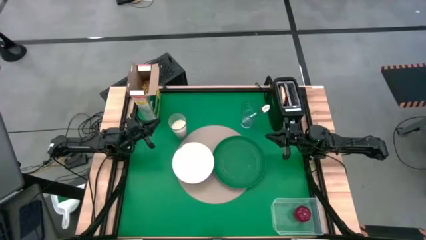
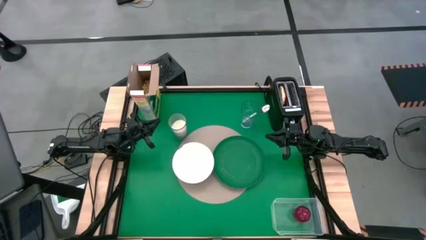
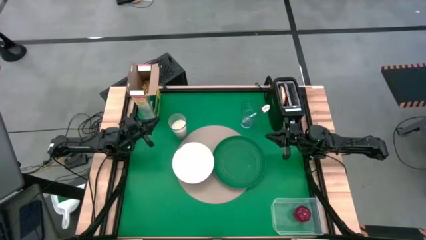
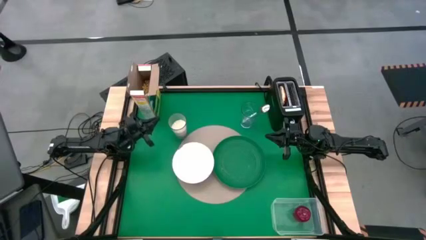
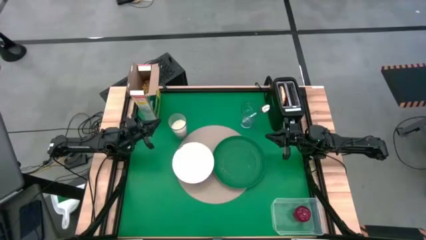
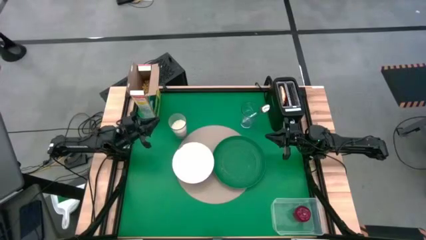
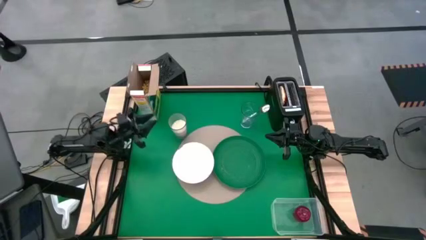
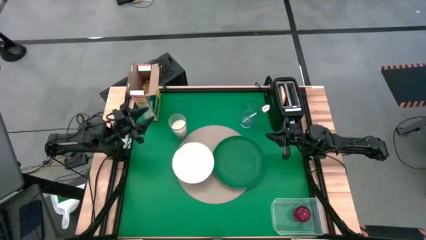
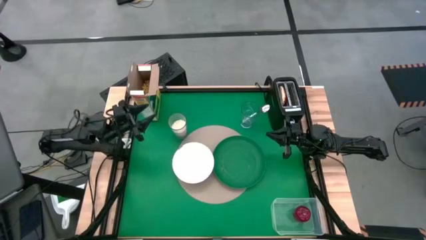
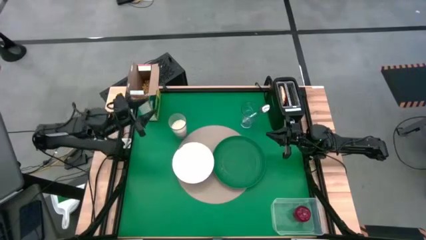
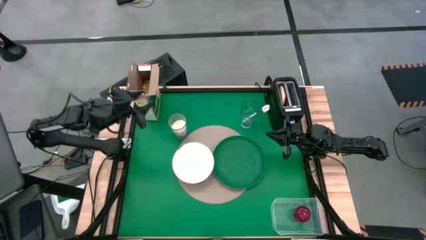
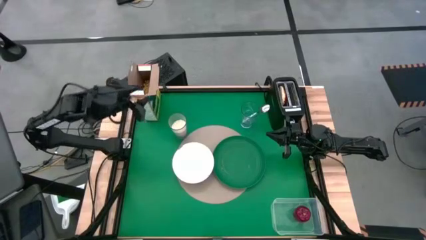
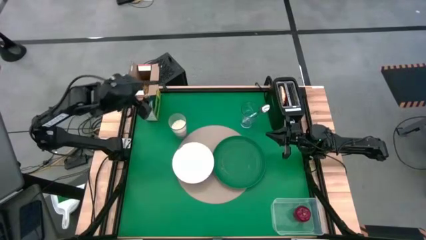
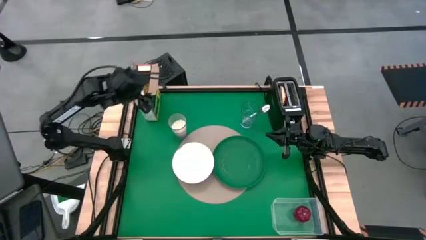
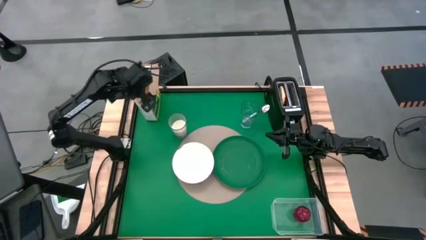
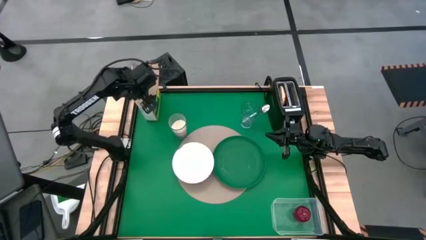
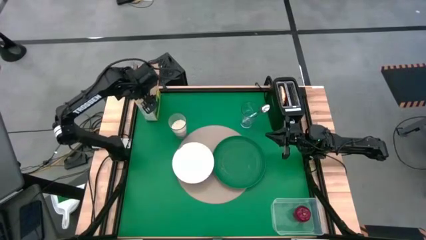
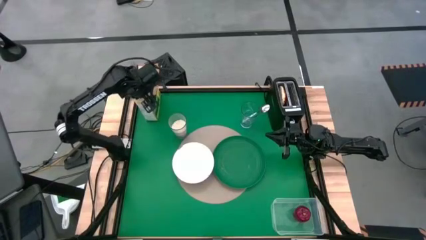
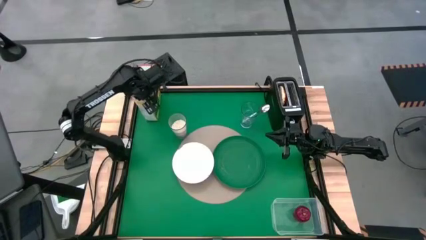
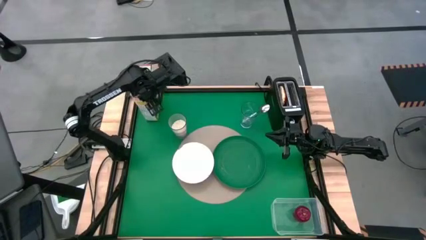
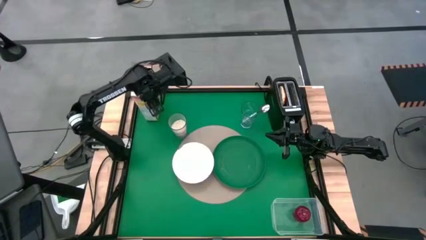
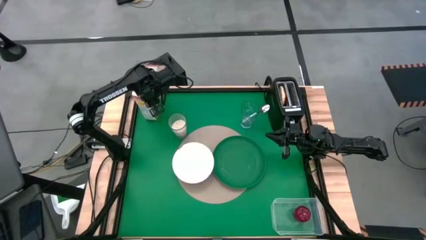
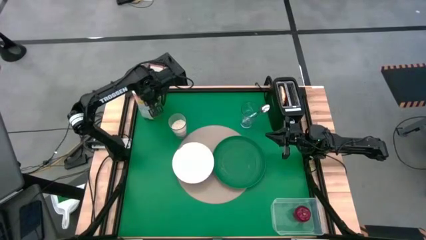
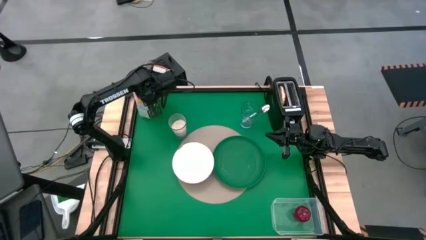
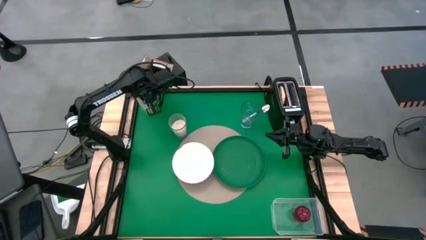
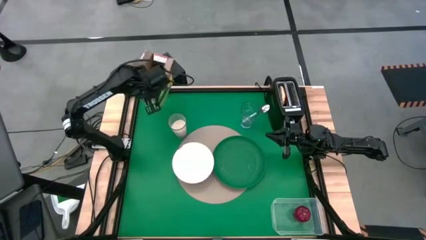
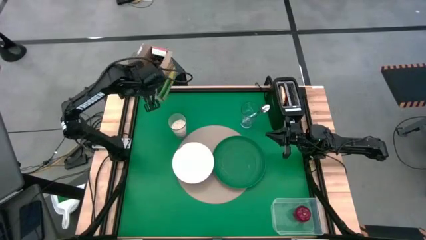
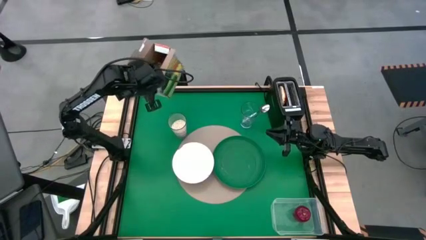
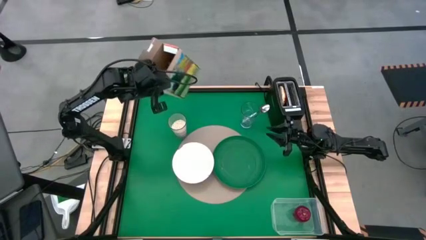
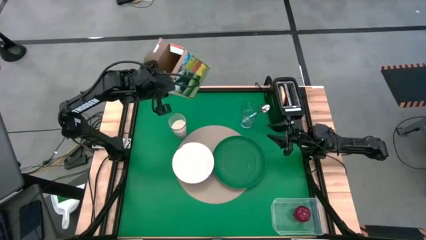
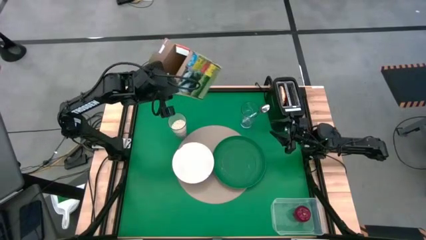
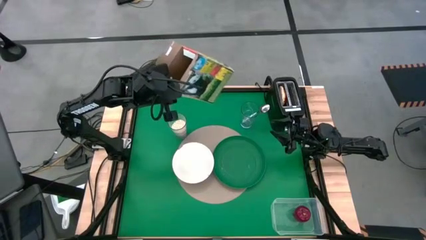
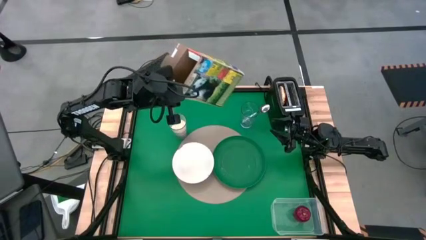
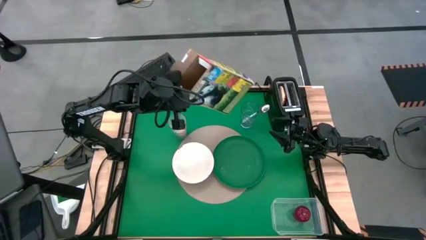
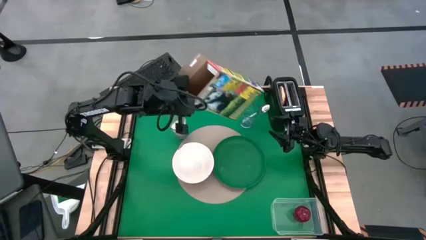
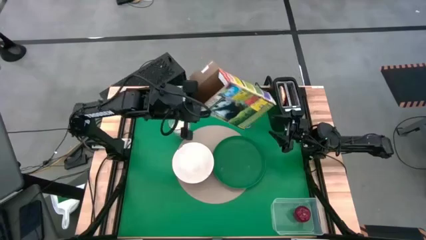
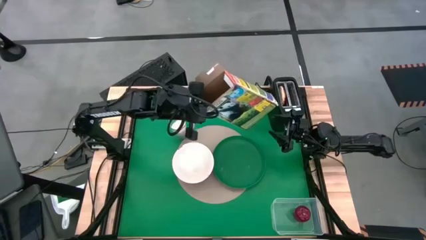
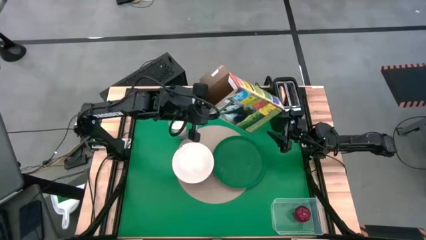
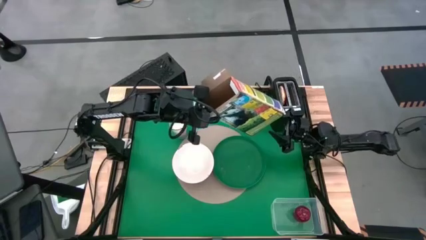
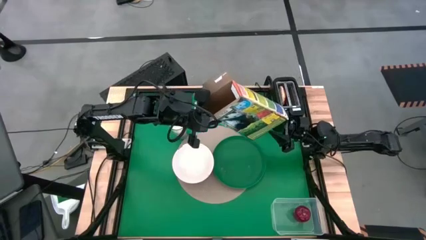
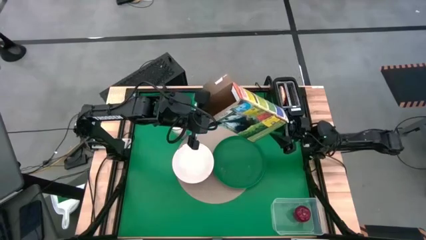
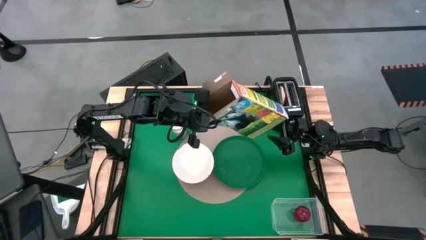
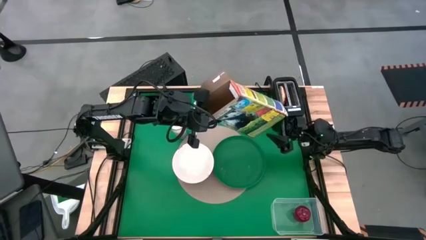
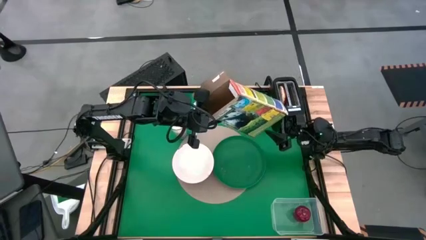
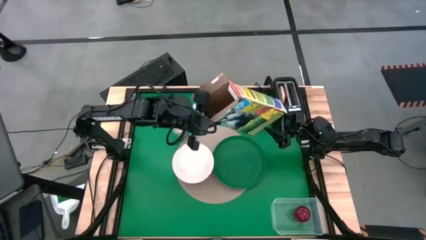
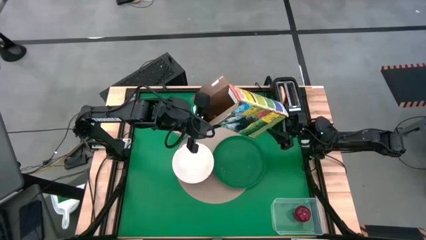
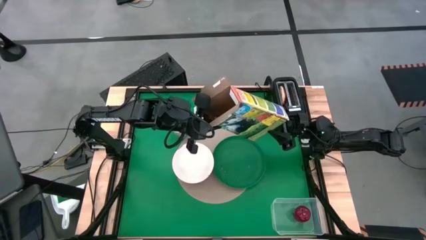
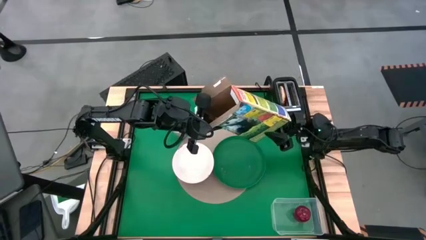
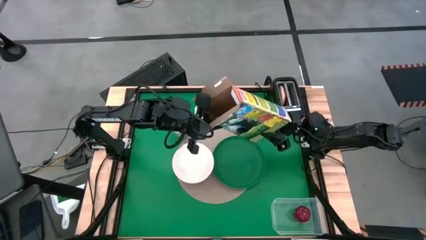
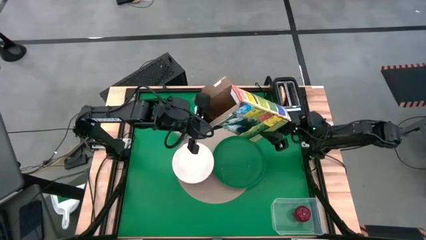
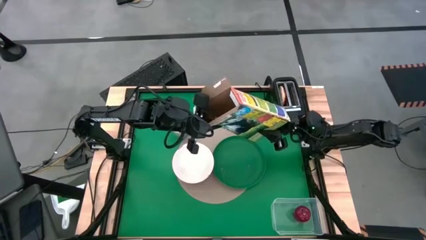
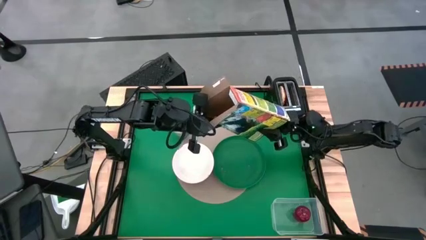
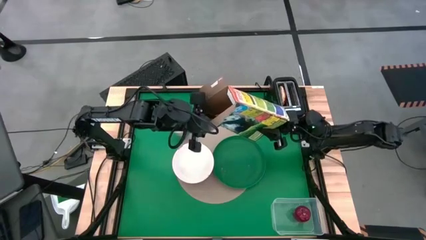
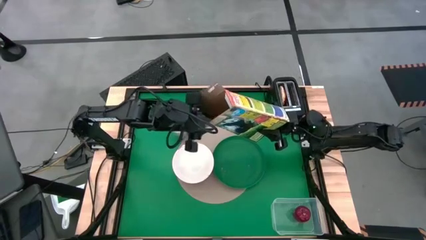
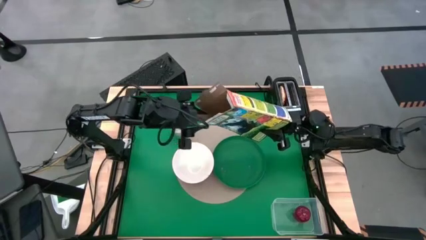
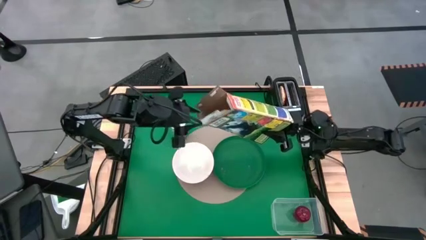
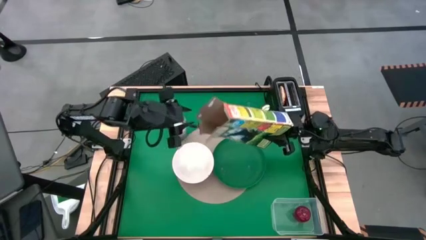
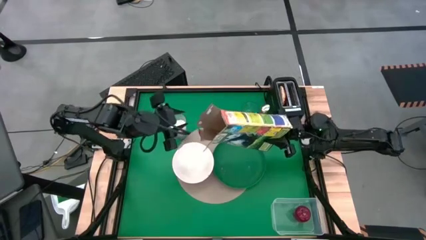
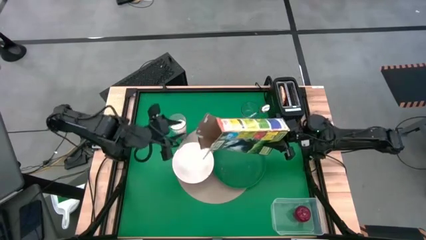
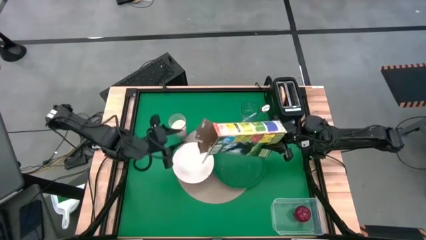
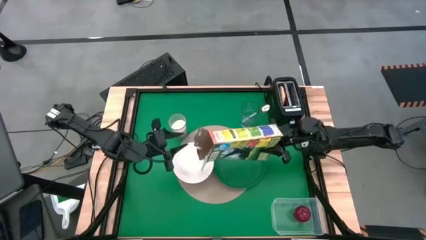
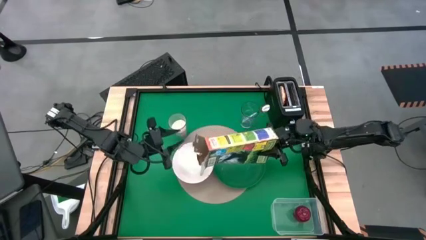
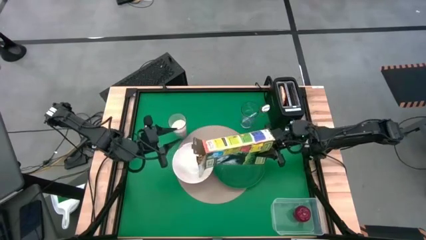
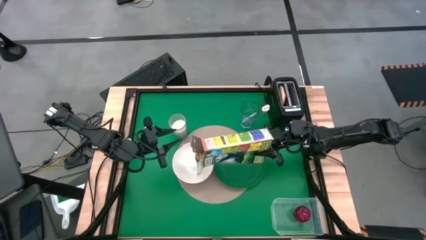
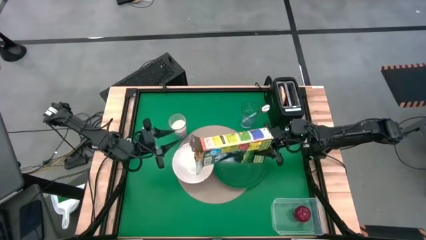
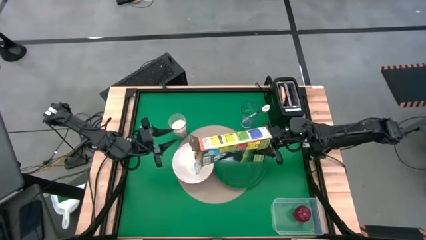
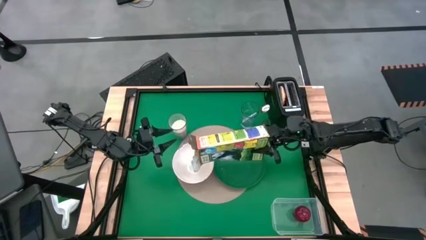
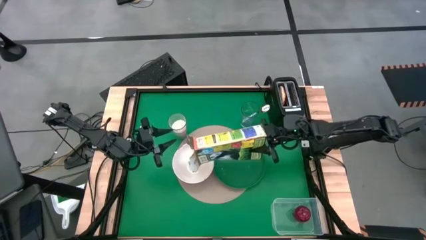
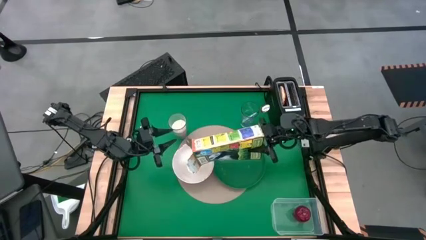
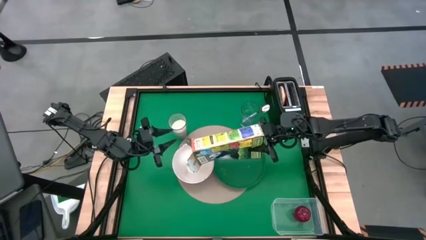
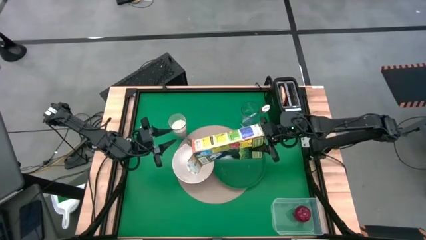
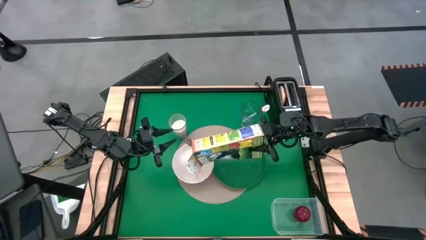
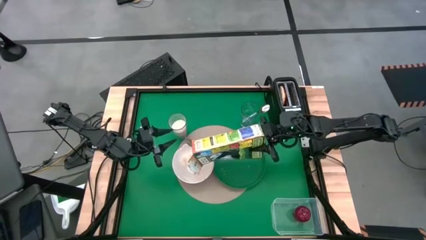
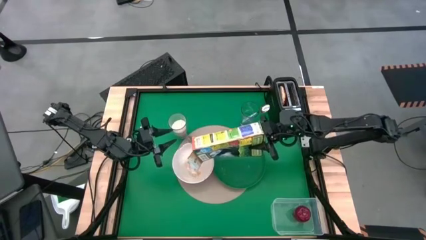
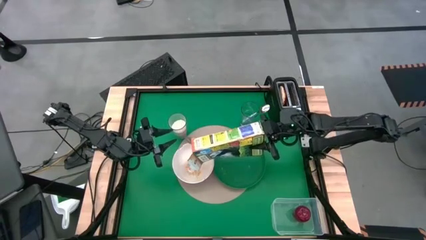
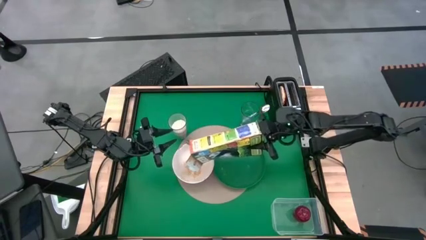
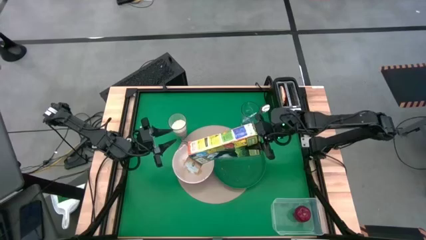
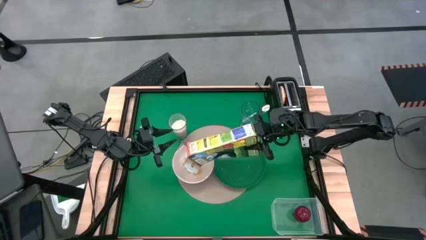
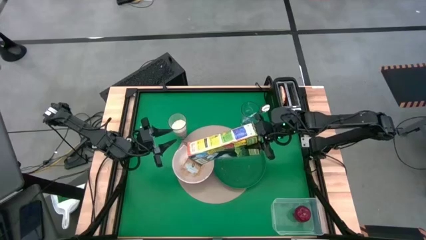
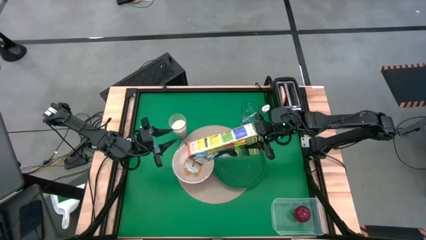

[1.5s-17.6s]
Task: Arrange a breakfast setting
Pour the cereal from the cereal box into the bowl
